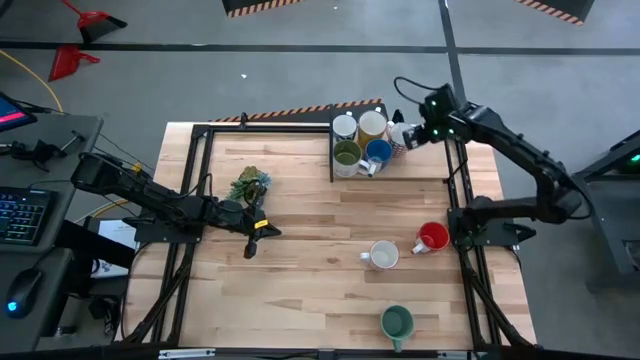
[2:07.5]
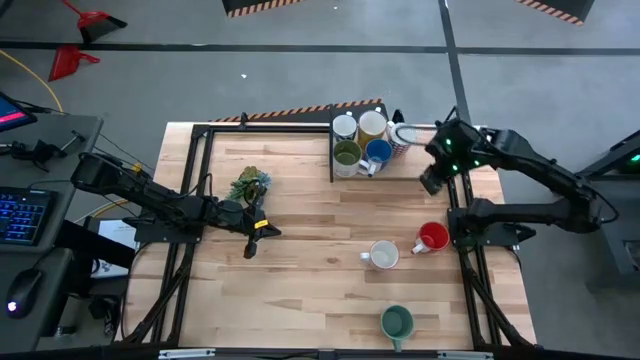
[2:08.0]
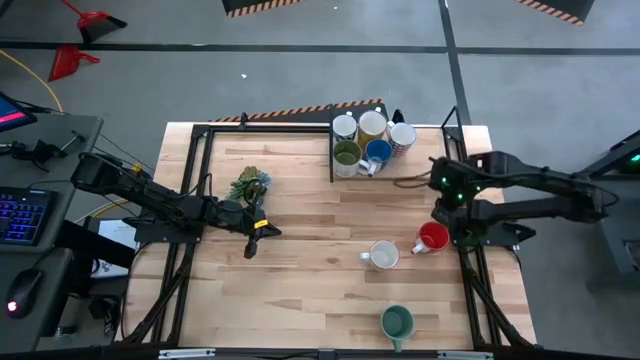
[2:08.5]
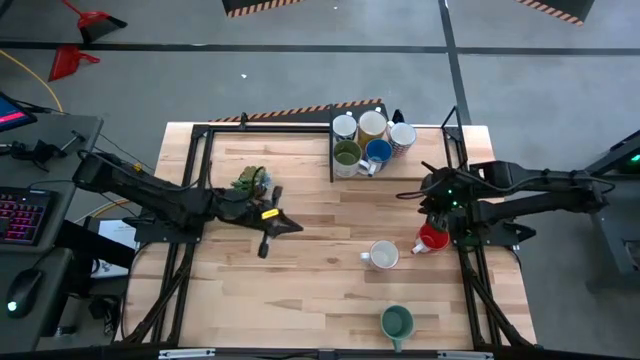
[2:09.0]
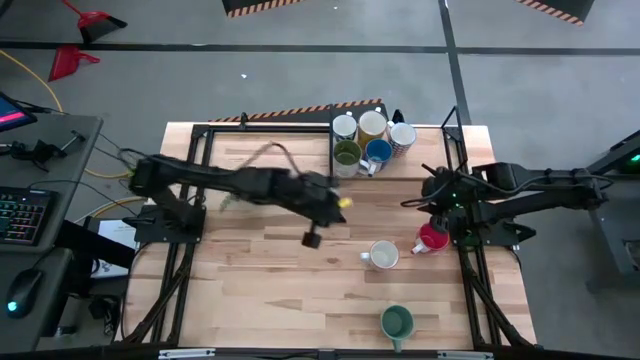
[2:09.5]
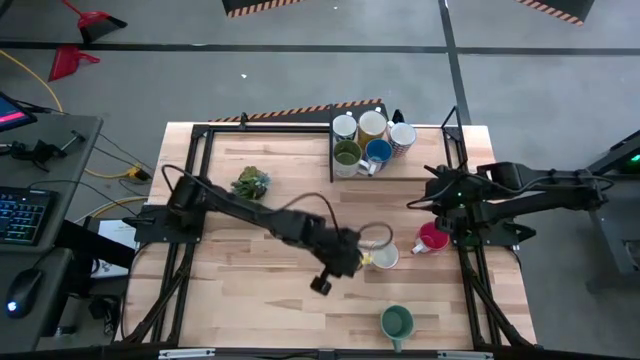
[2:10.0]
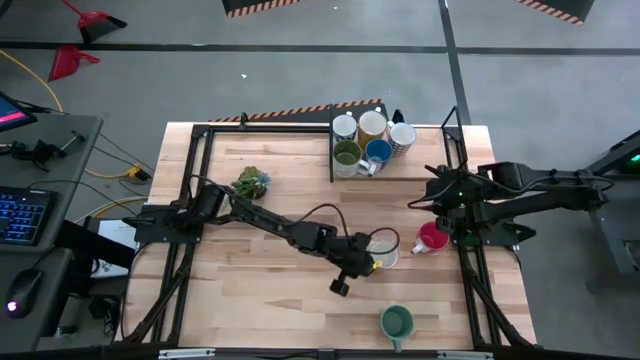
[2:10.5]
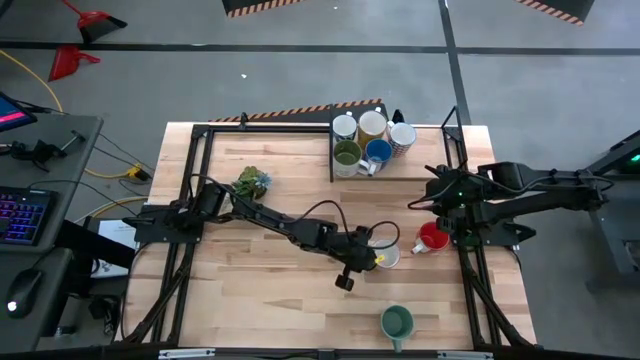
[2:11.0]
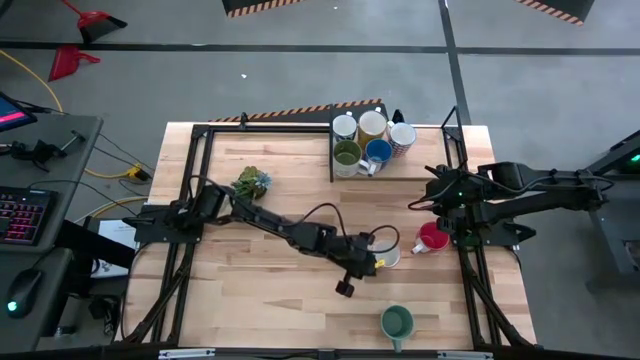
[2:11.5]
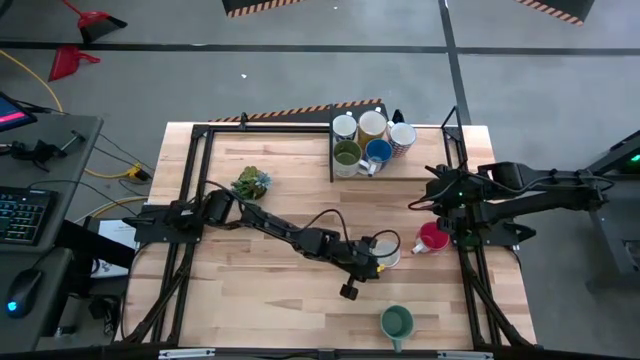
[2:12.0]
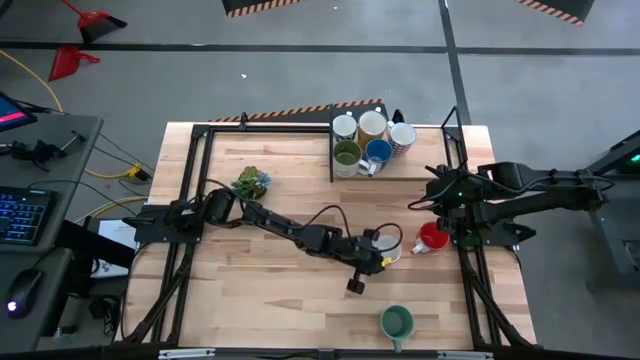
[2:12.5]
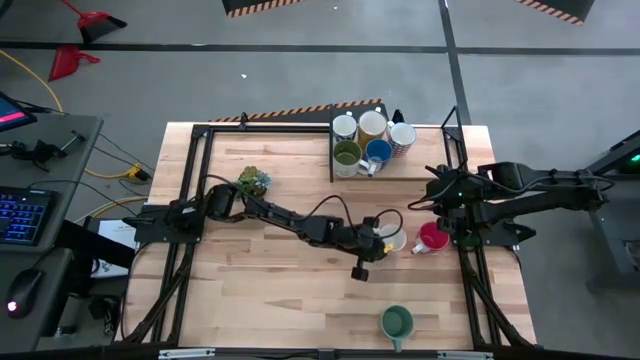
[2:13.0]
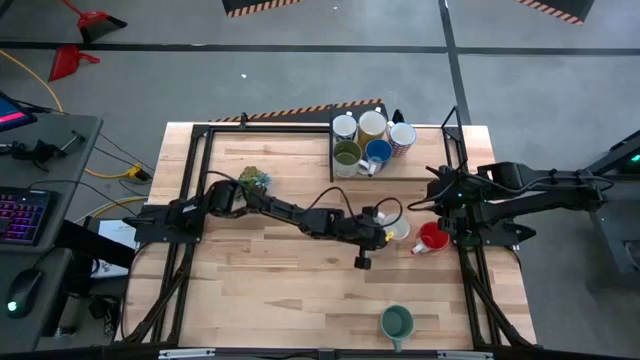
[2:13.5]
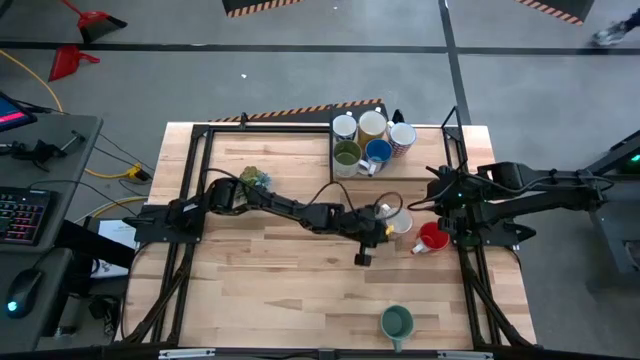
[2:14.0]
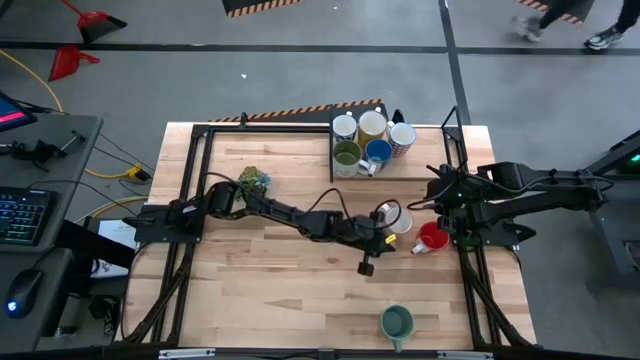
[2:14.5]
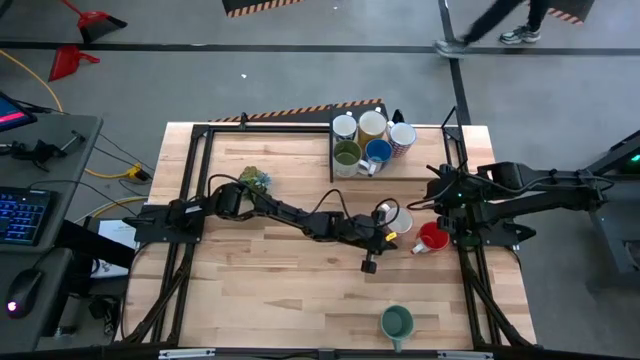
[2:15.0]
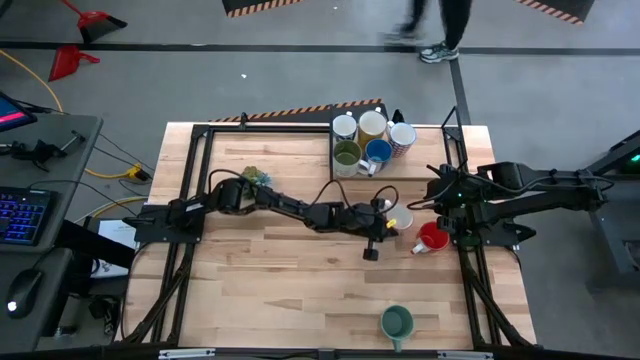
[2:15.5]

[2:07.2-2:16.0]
Task: Place coffee mugs
Adjust the white gray mug on the table

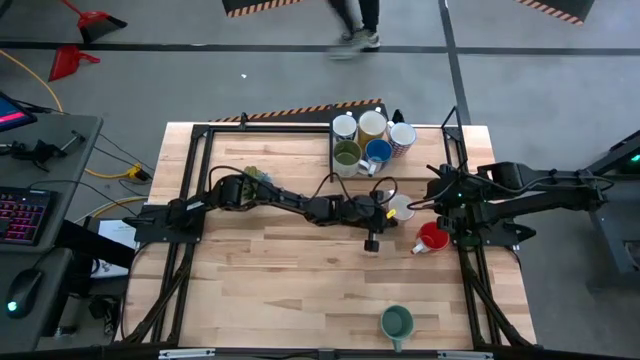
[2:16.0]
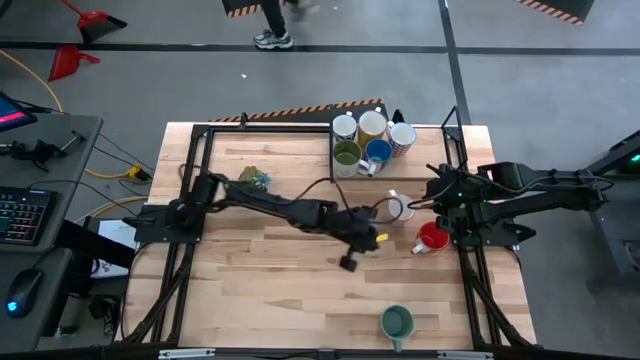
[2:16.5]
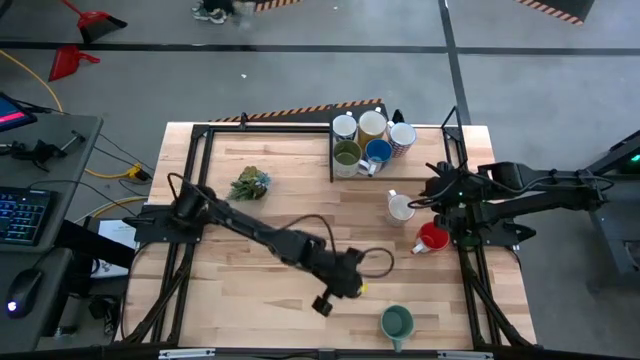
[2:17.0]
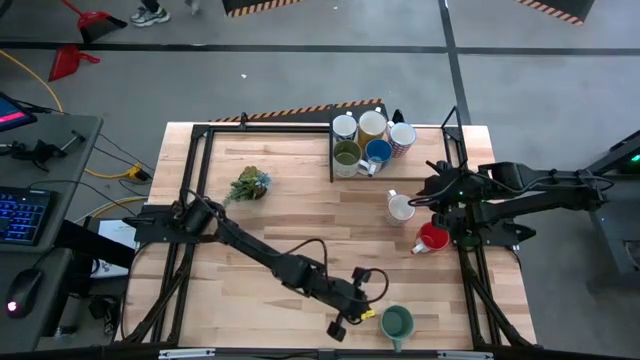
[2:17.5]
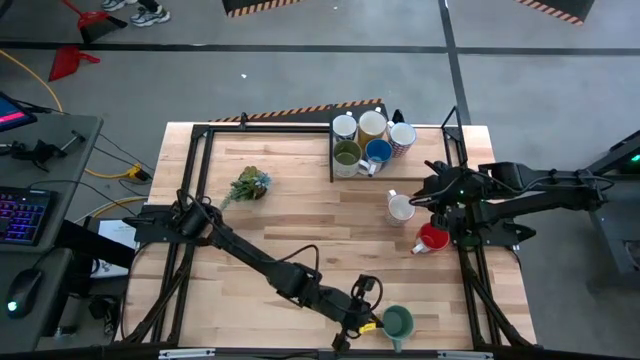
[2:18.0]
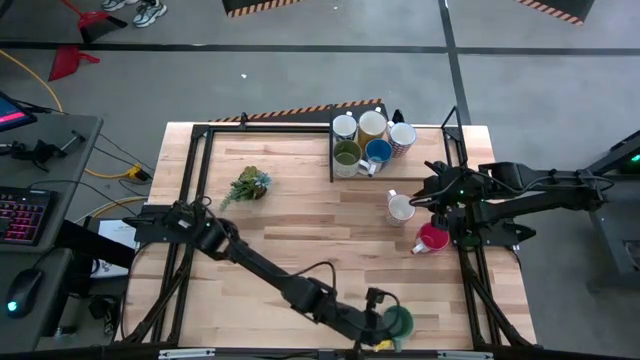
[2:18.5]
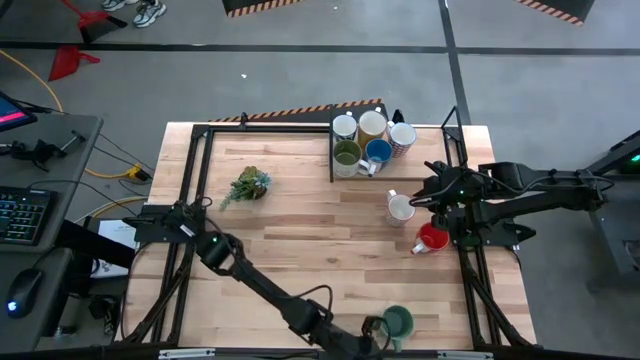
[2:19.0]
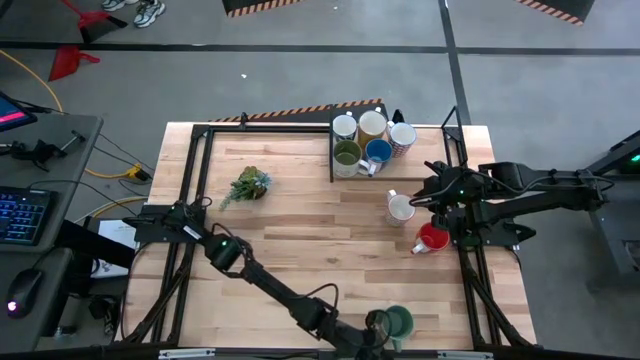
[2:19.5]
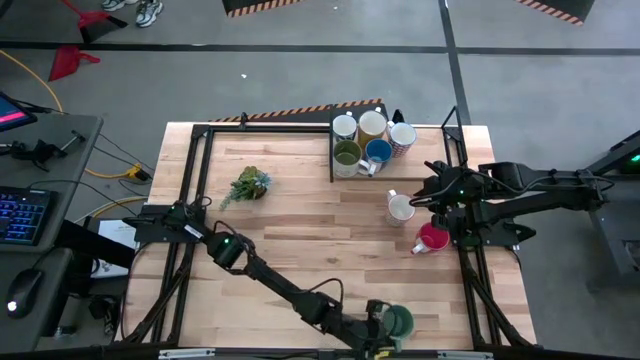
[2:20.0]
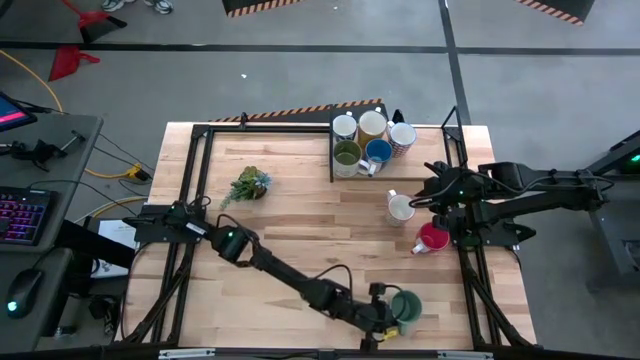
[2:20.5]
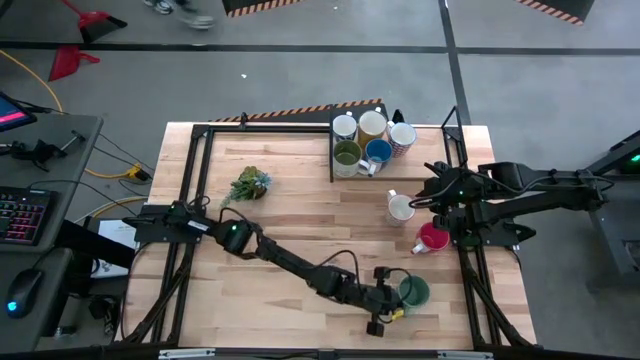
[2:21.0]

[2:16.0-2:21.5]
Adjust the green mug on the table

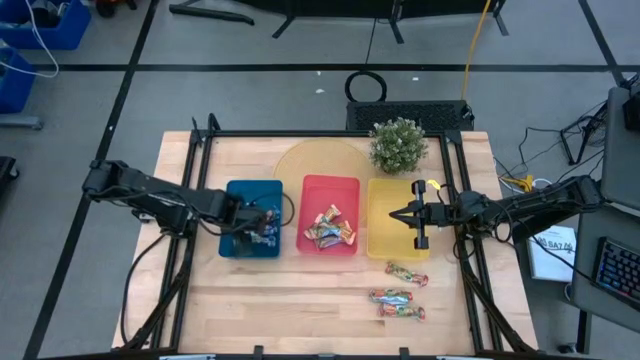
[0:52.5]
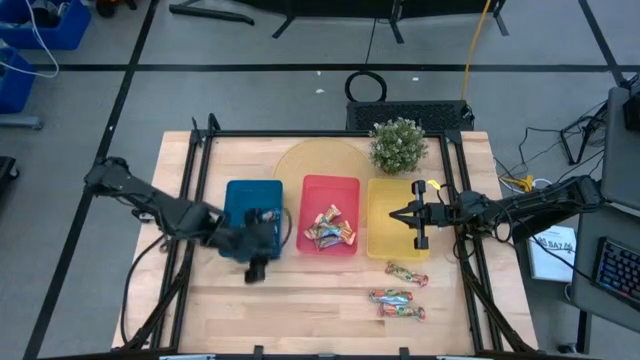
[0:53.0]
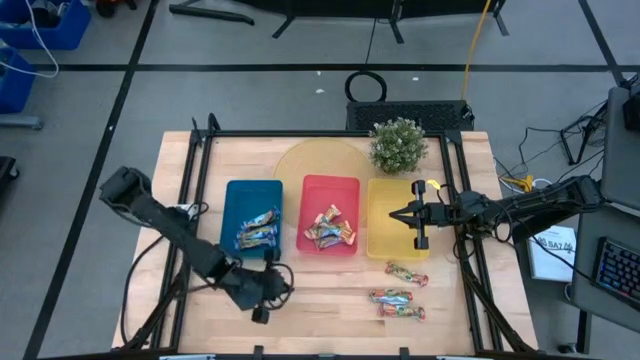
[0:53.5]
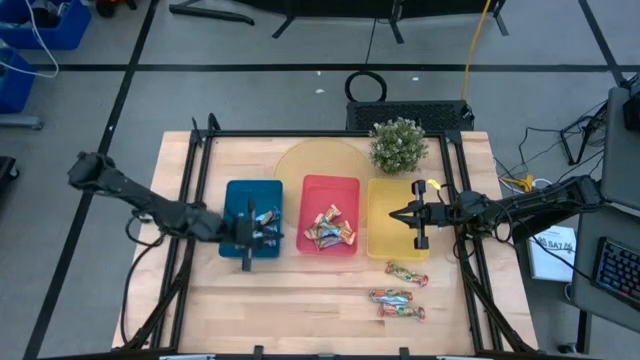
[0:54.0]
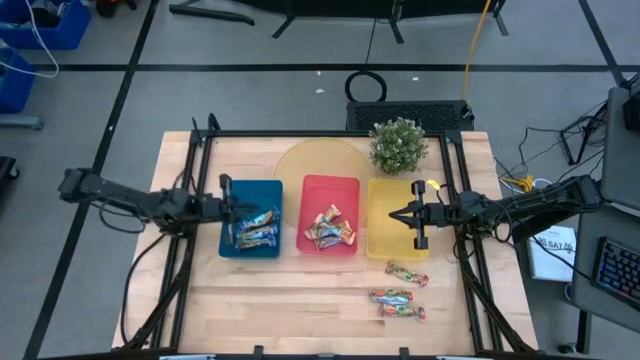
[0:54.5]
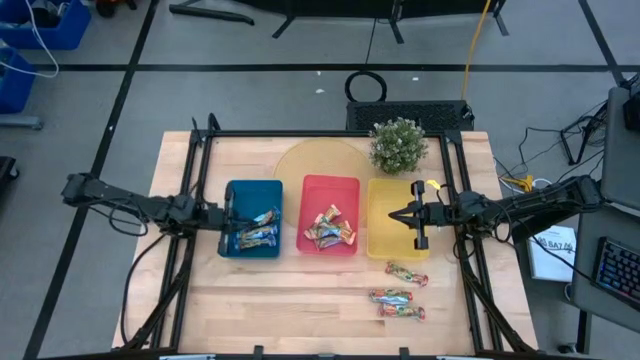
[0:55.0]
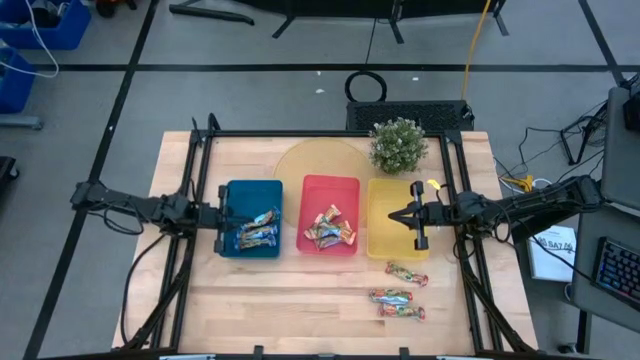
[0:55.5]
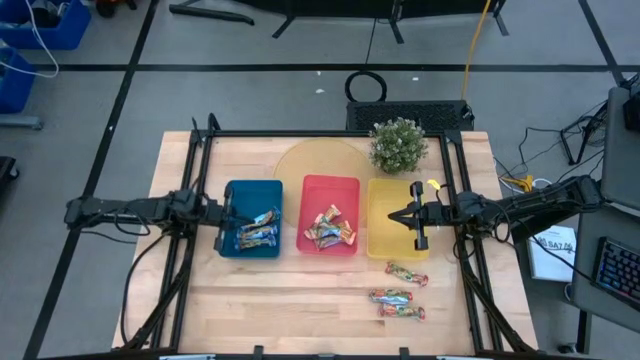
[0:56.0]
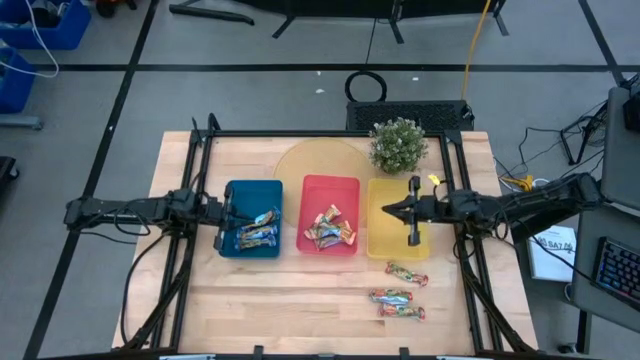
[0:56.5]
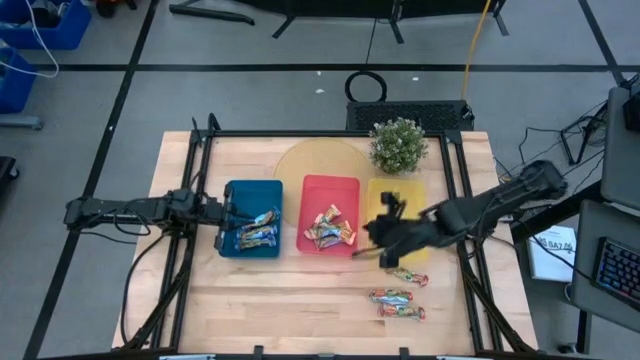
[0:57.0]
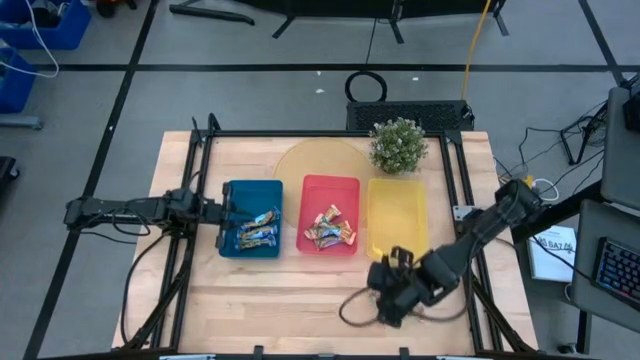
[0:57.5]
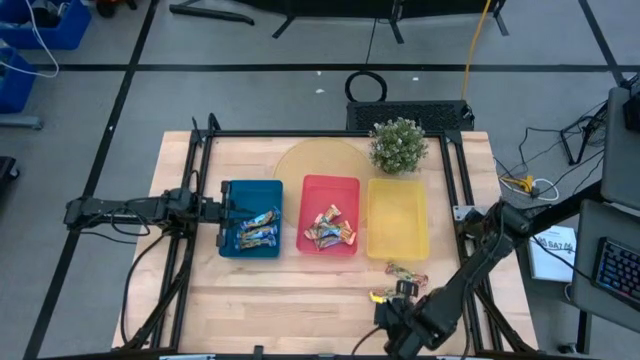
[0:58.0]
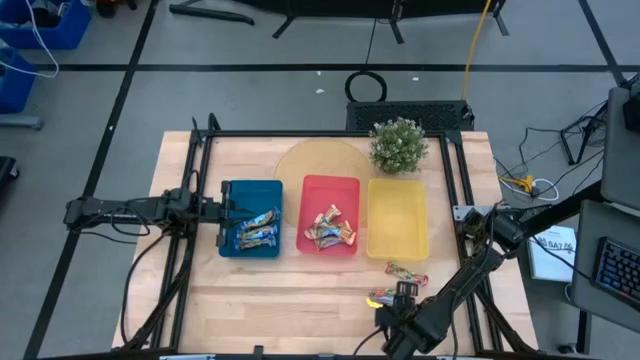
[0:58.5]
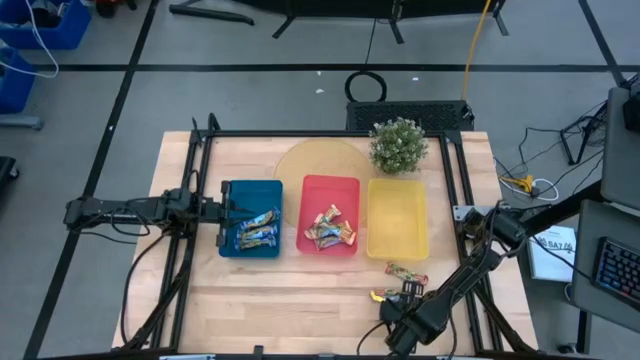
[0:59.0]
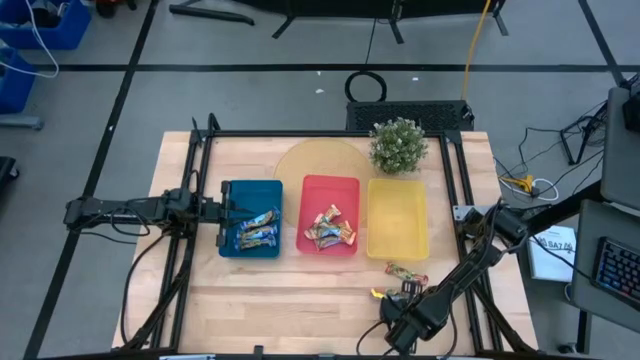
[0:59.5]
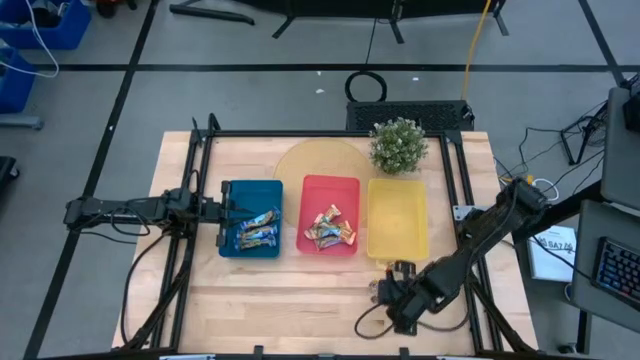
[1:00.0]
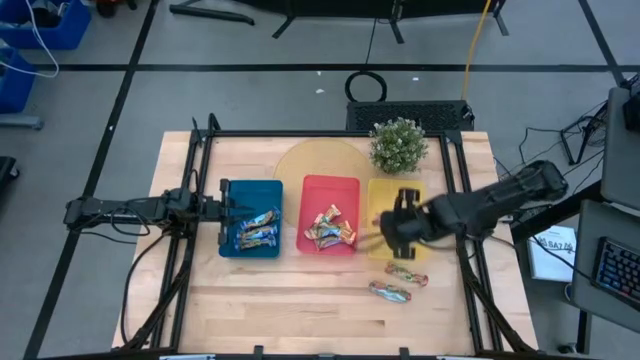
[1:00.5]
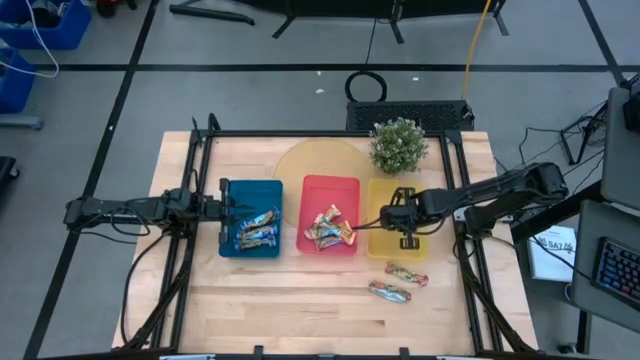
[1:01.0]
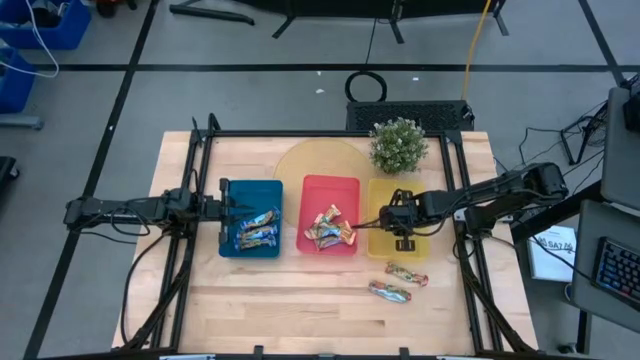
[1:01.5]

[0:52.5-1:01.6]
Task: Pick and place Granola Bars by type
Put the red granola bar into the yellow bin
